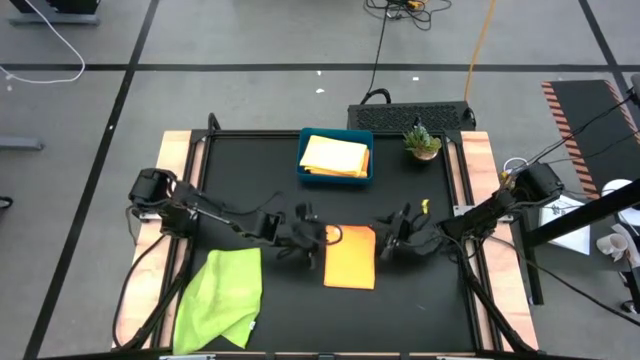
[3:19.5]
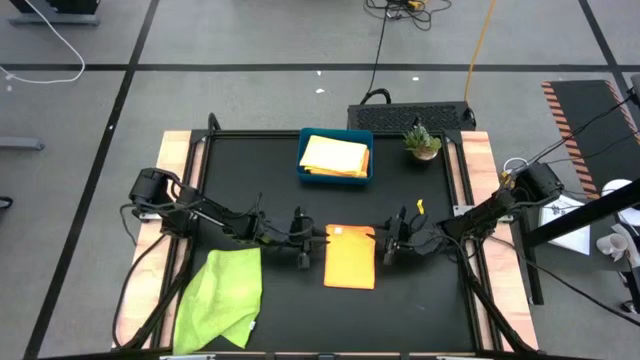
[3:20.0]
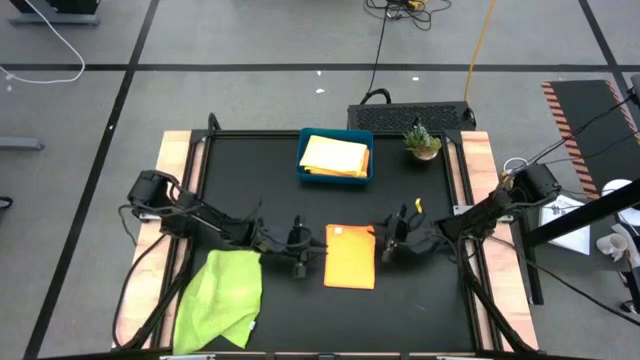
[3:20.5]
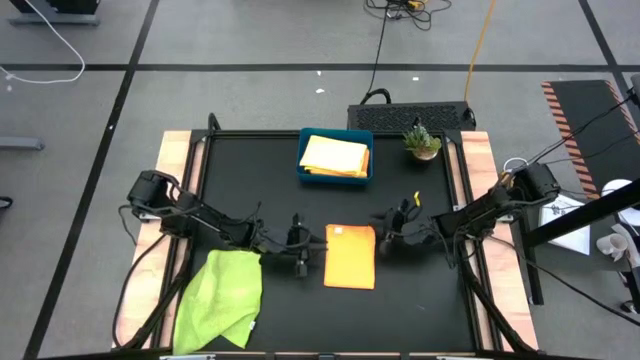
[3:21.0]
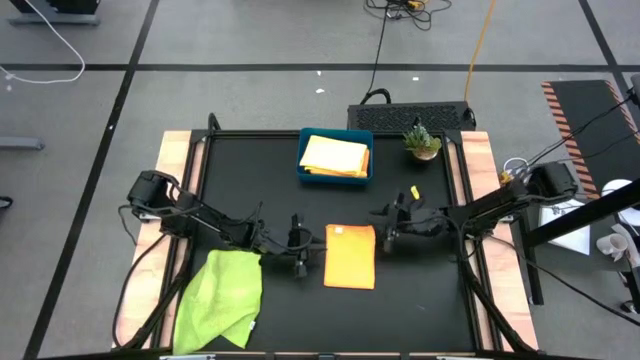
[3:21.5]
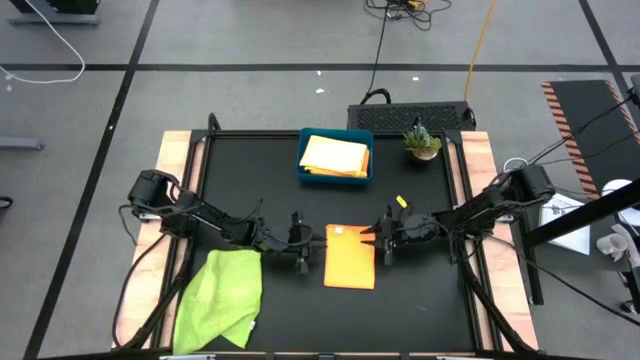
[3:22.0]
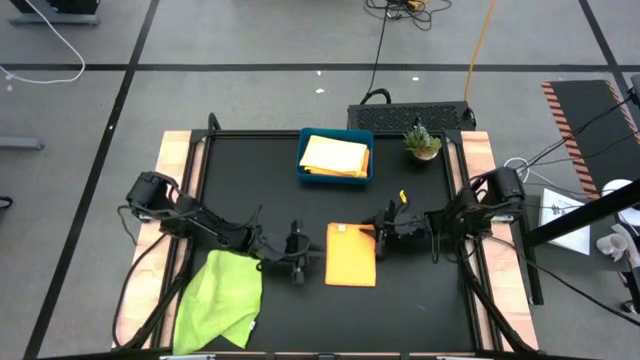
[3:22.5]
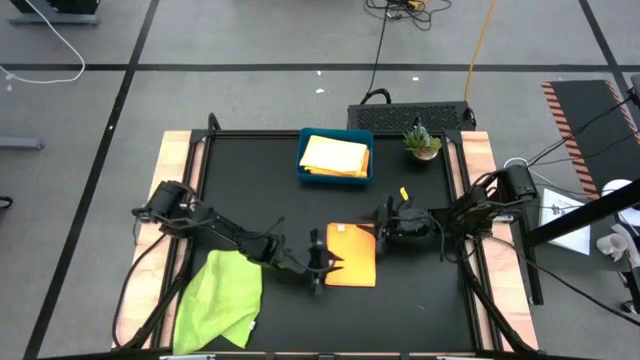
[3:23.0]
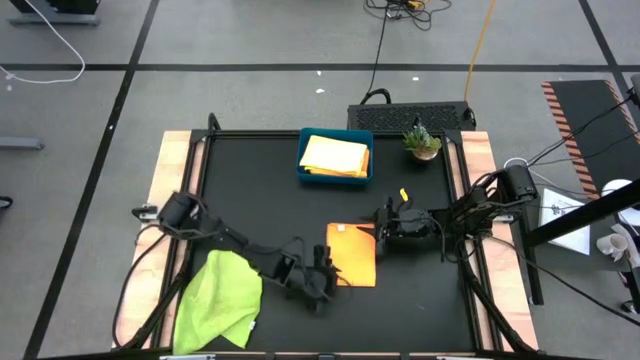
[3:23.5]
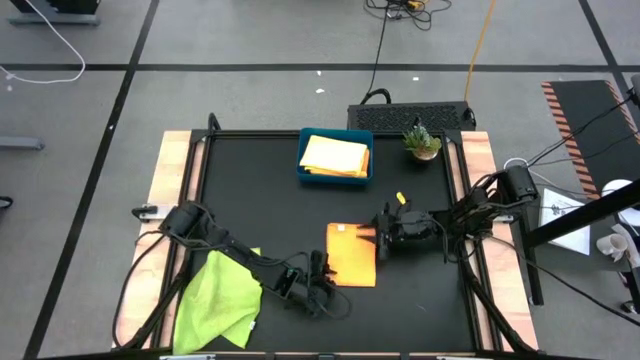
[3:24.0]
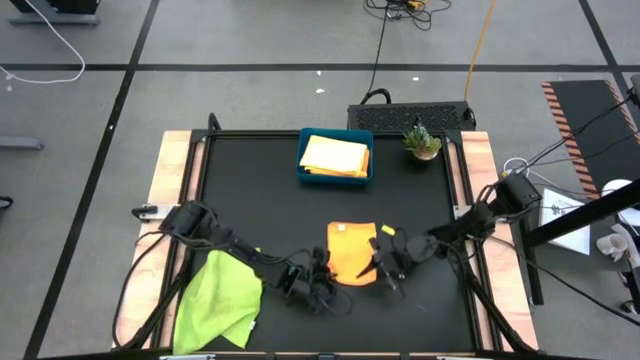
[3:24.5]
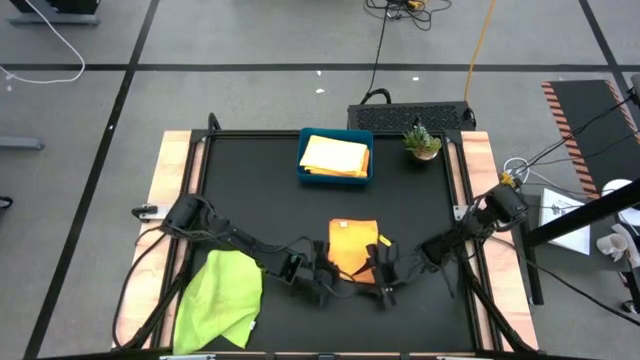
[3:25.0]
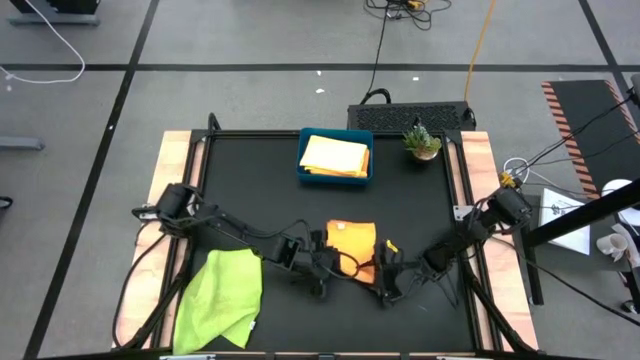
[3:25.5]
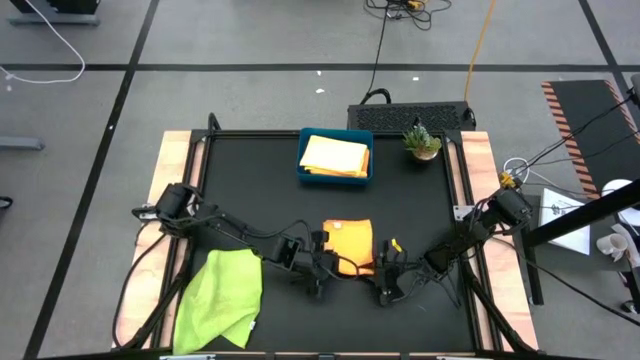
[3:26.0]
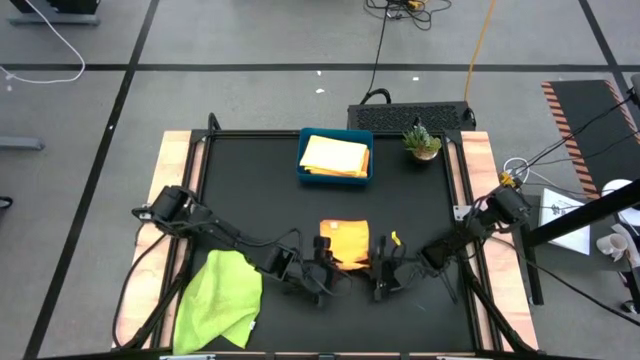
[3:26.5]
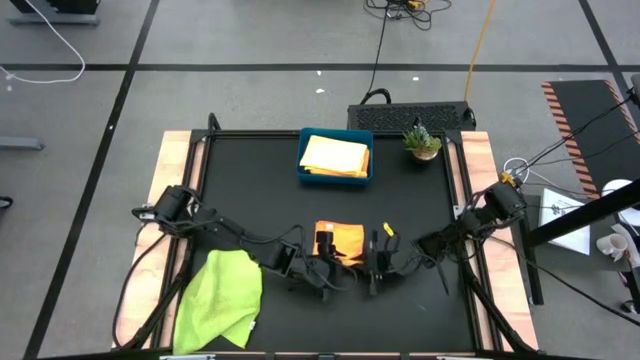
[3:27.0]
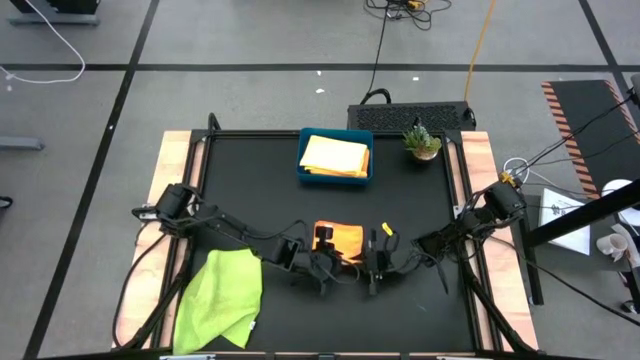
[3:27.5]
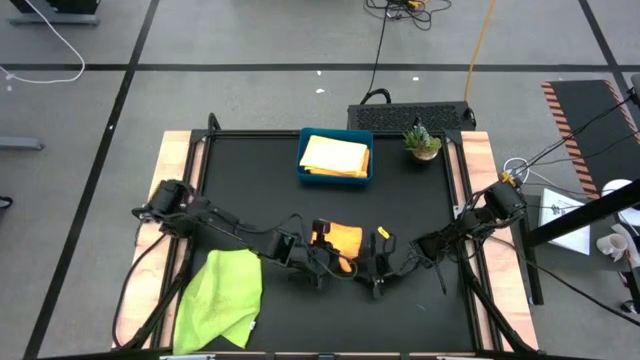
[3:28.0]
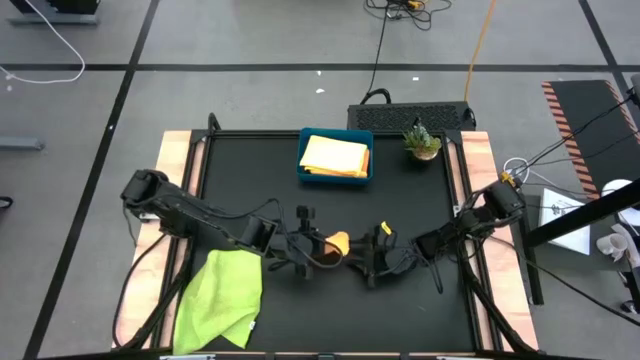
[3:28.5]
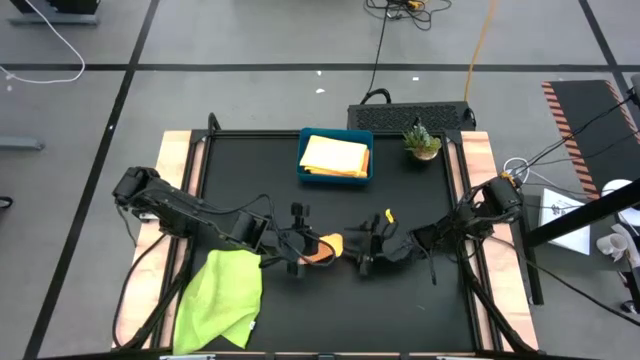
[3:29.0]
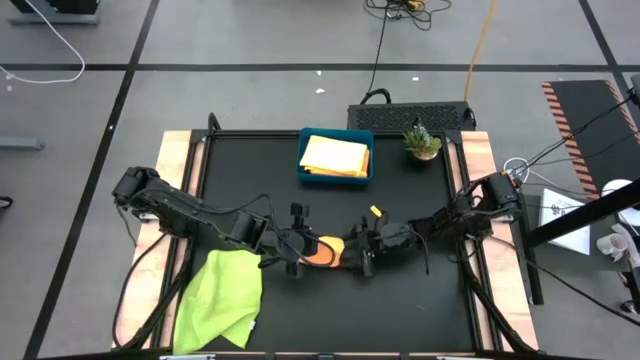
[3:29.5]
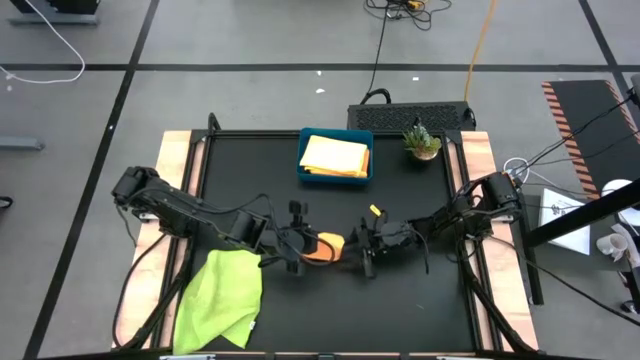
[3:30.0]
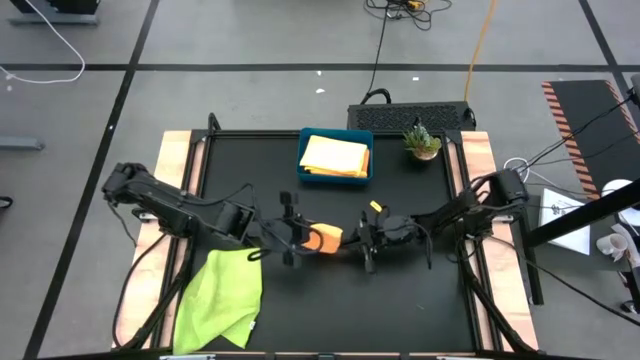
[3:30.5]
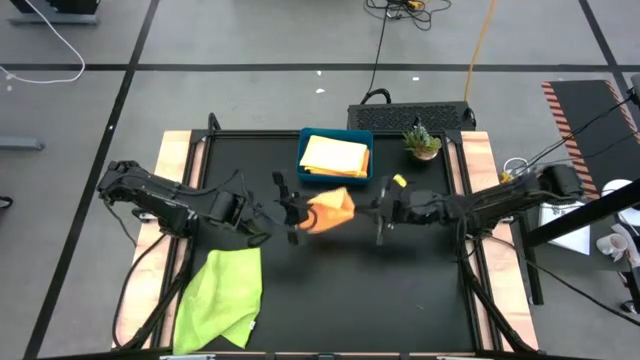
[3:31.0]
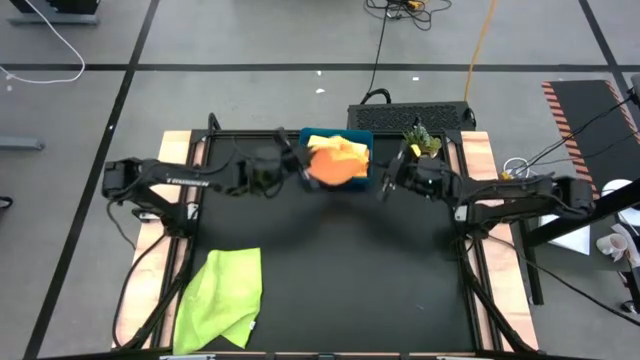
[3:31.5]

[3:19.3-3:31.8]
Task: Fold microfiber towels
Put the orange microfiber cloth into the dark blue bin

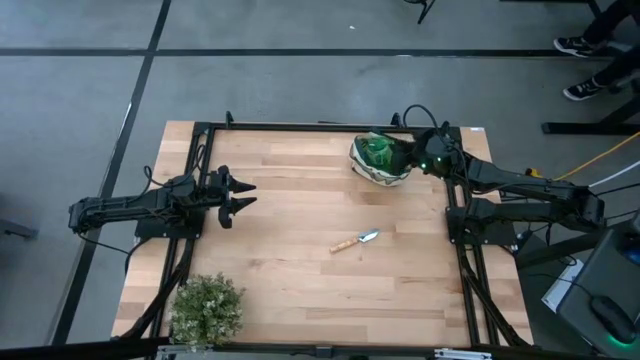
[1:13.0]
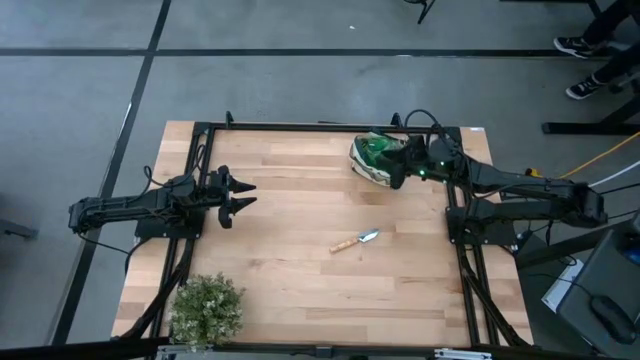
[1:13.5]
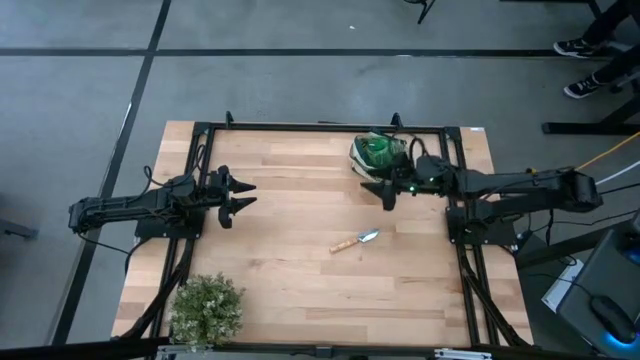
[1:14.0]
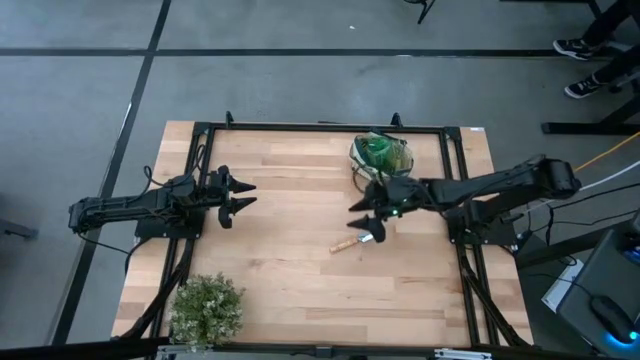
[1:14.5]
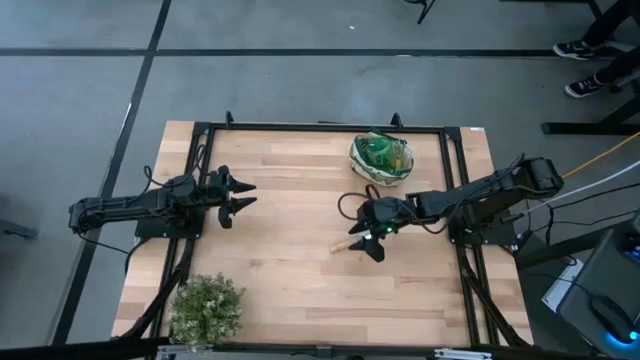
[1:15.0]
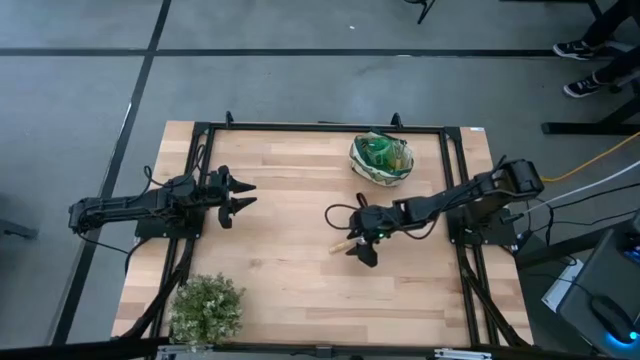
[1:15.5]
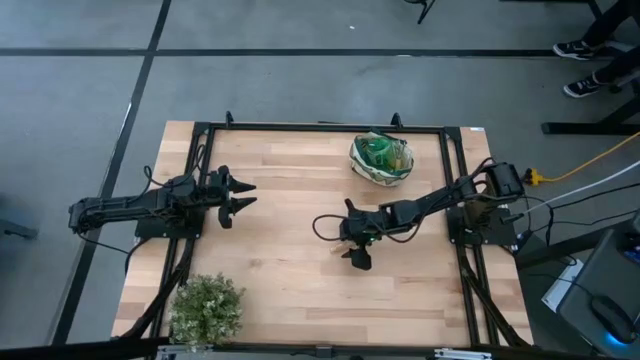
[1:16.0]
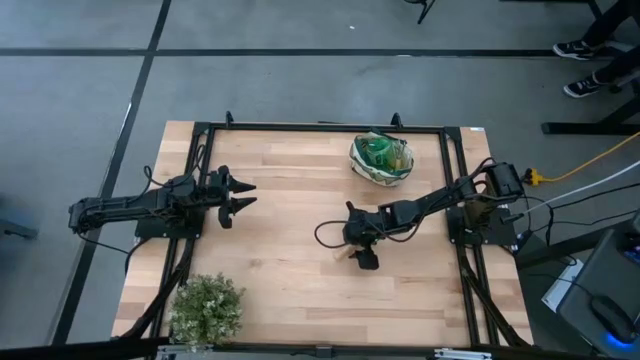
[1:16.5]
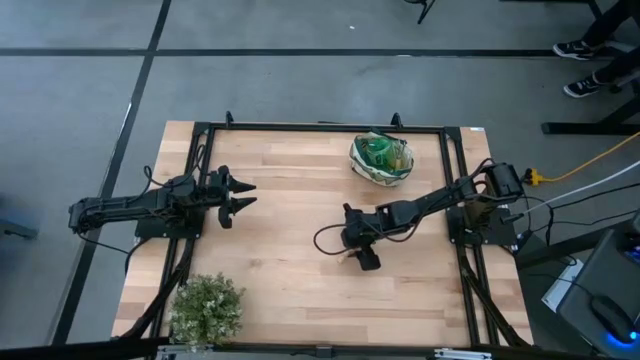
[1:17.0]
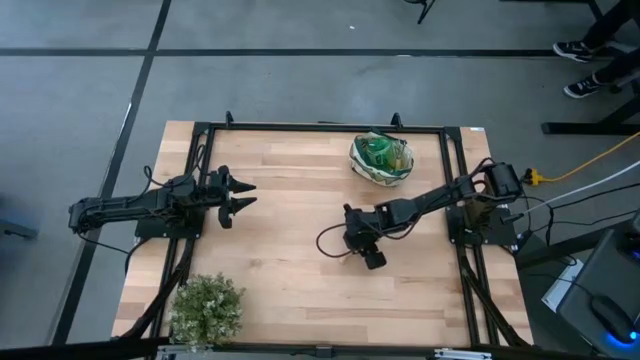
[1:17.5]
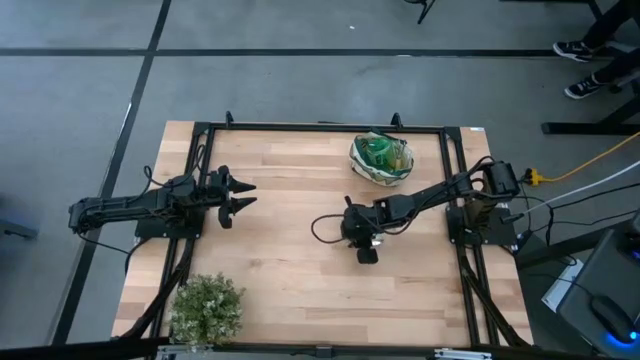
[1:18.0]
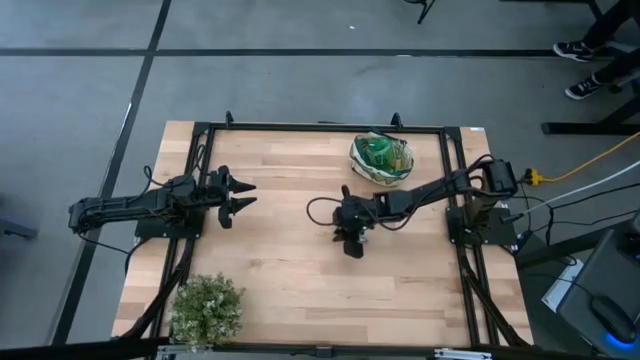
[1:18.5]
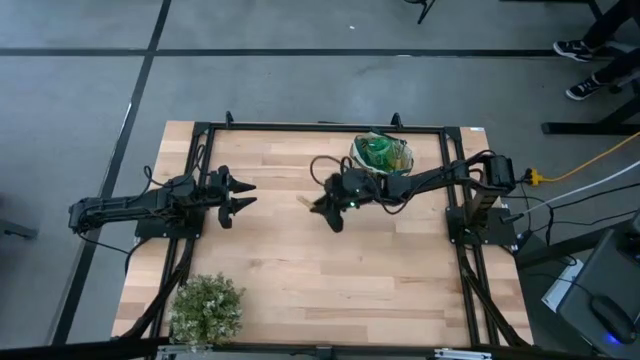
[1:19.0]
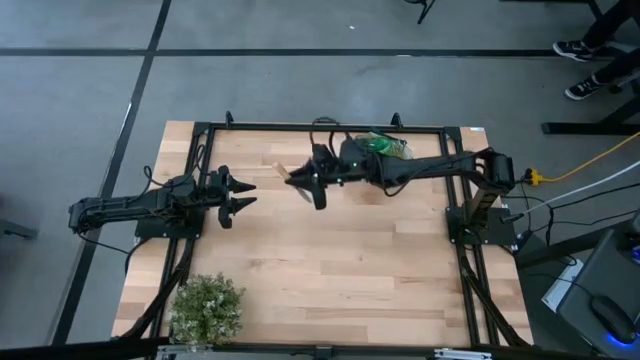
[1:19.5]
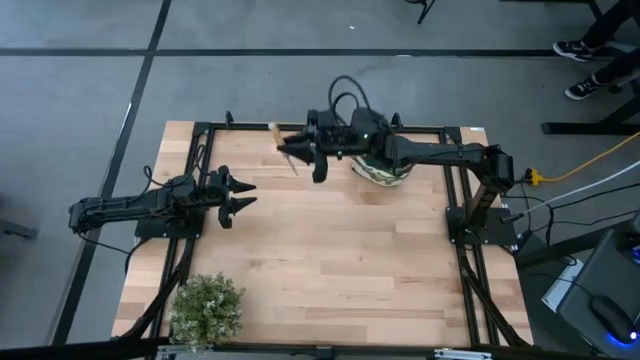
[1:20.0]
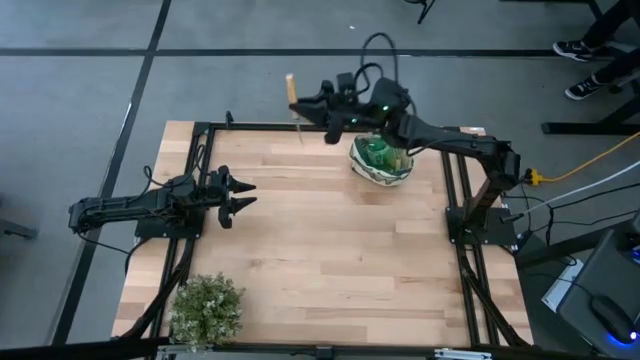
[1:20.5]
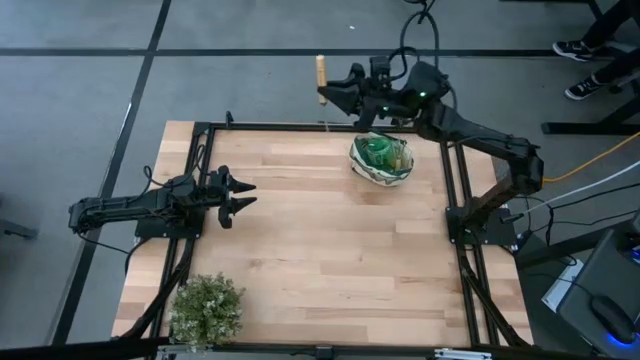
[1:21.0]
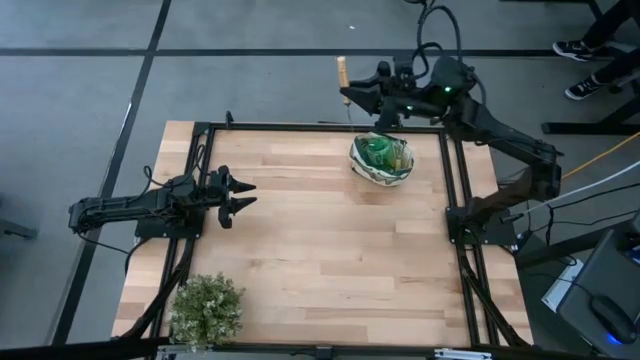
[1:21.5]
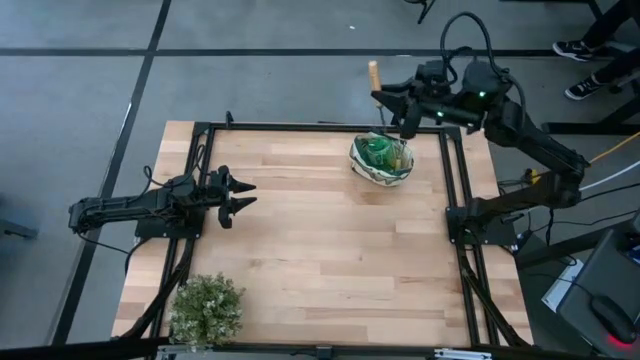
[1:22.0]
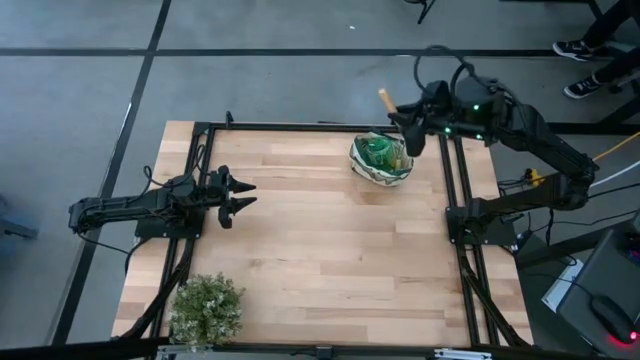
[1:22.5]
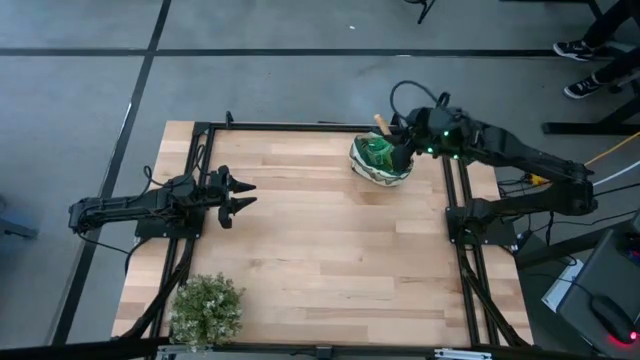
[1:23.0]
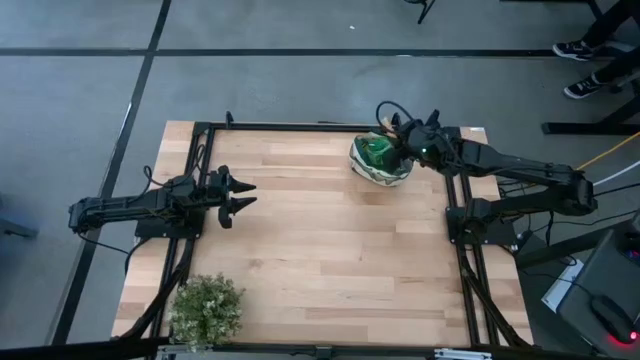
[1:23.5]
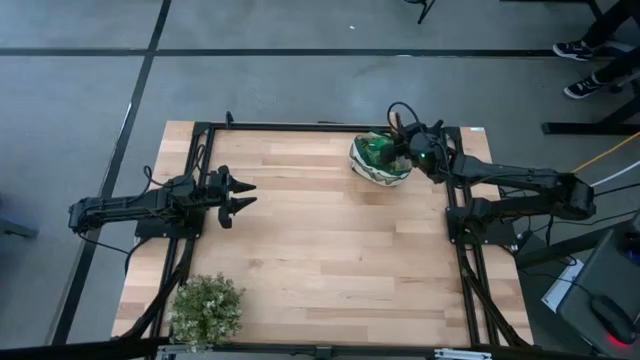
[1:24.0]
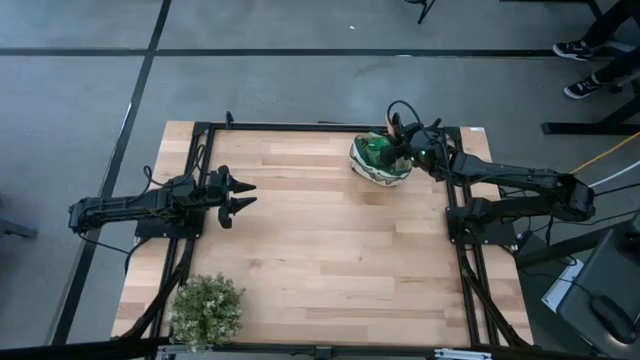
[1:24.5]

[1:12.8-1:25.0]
Task: Pick & Place Garden tools in Gardening bag
Put the hand trowel into the white bag
